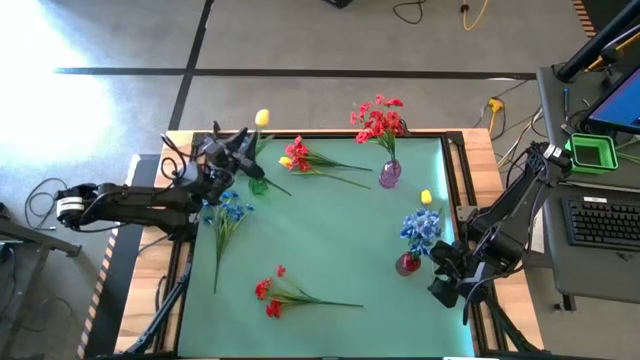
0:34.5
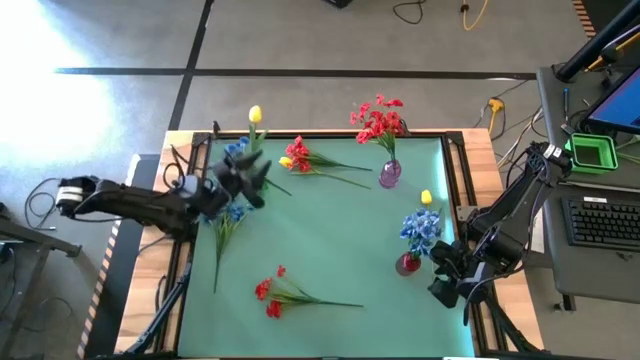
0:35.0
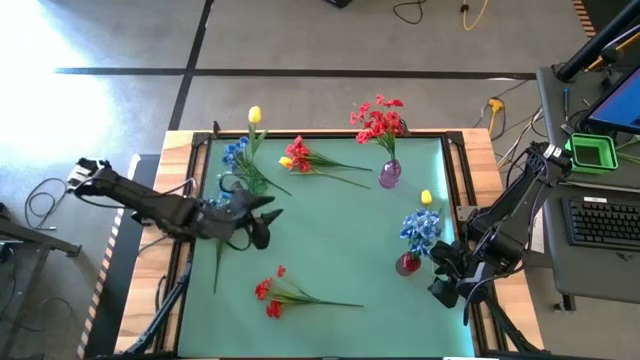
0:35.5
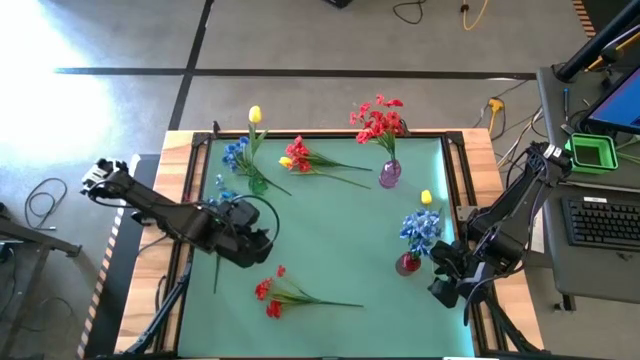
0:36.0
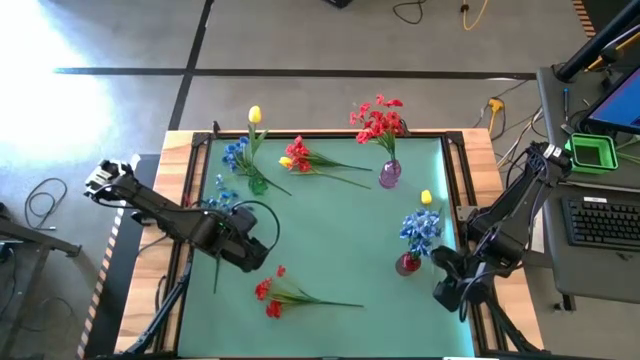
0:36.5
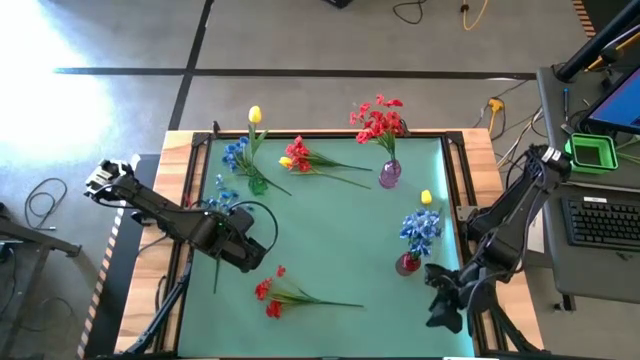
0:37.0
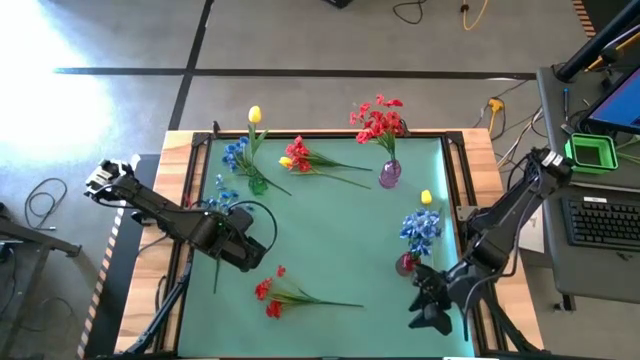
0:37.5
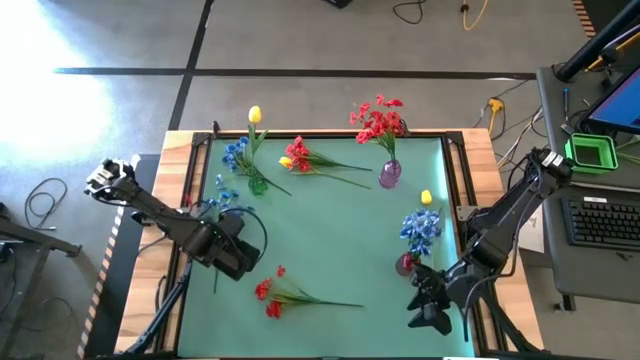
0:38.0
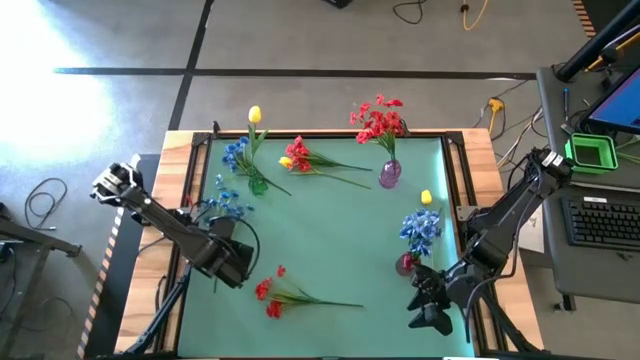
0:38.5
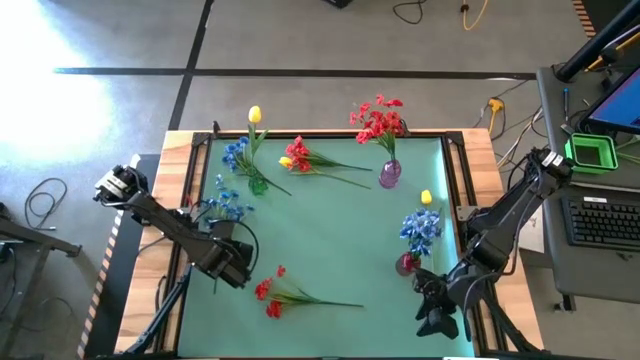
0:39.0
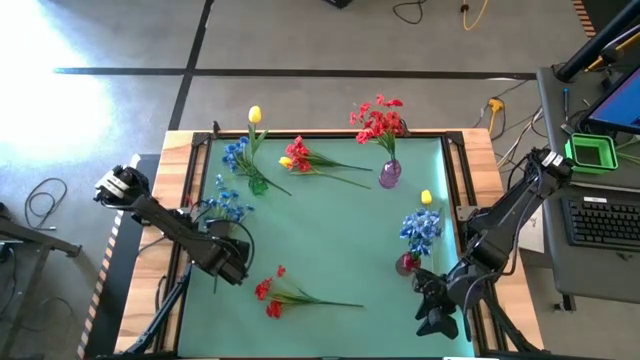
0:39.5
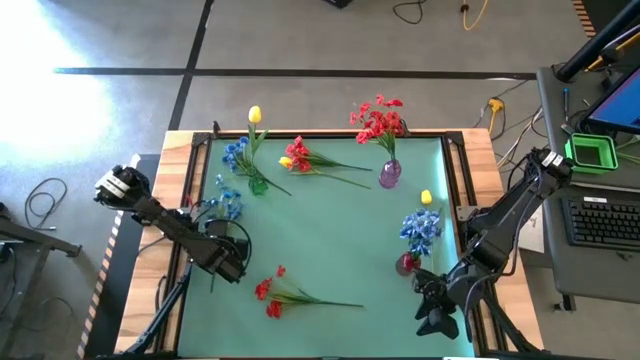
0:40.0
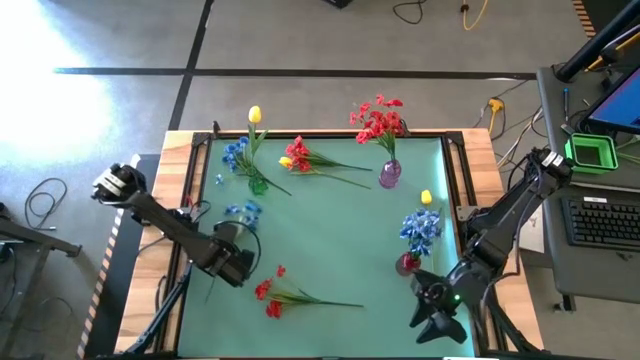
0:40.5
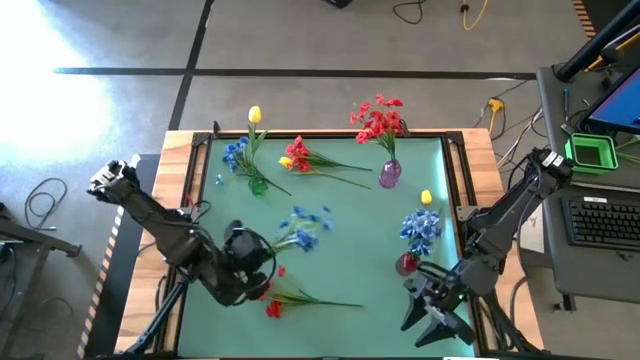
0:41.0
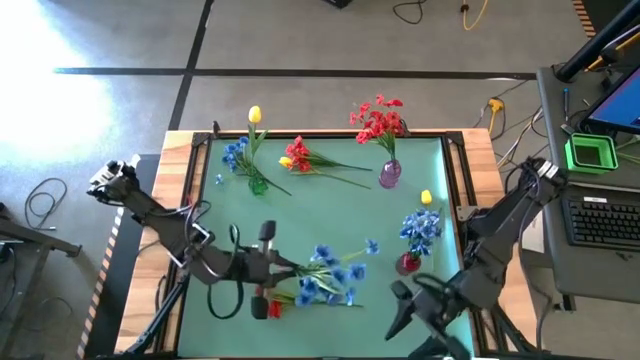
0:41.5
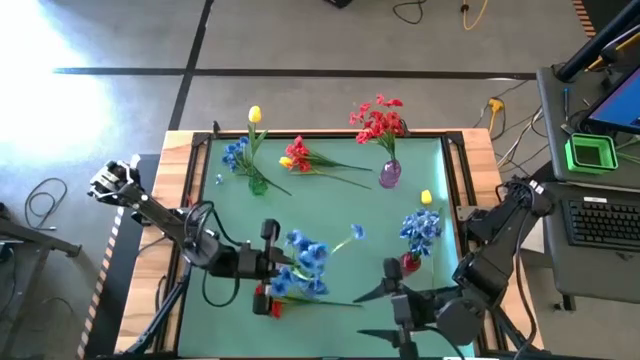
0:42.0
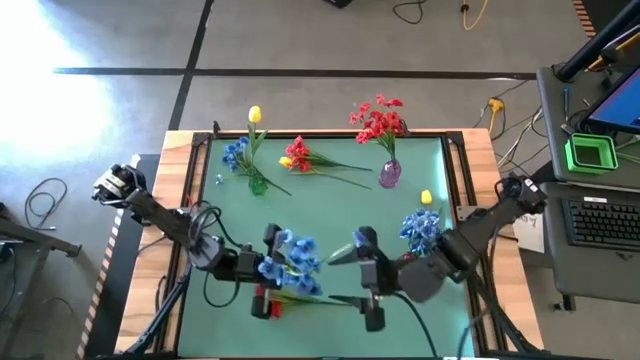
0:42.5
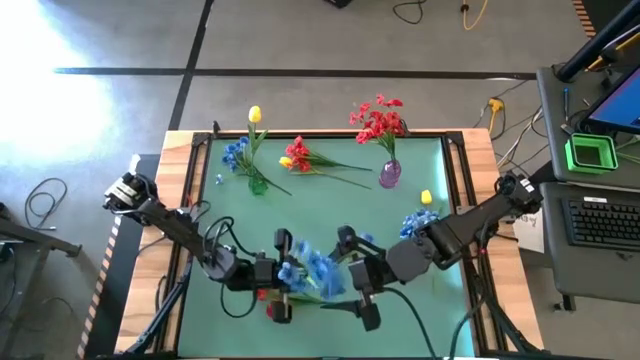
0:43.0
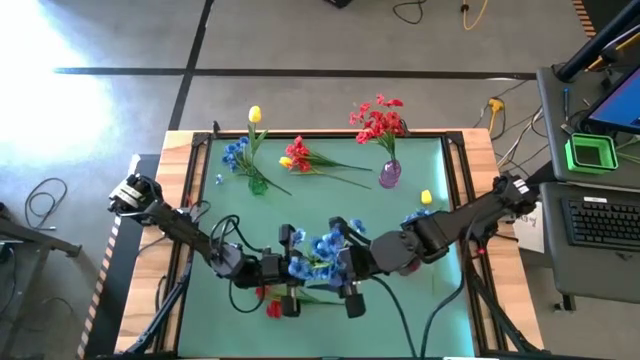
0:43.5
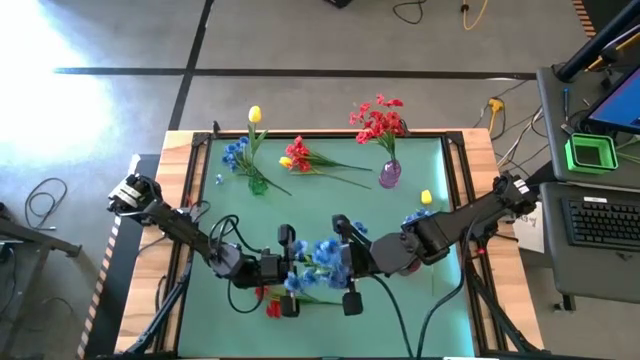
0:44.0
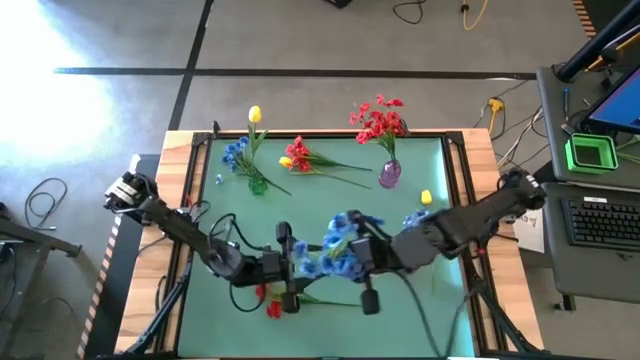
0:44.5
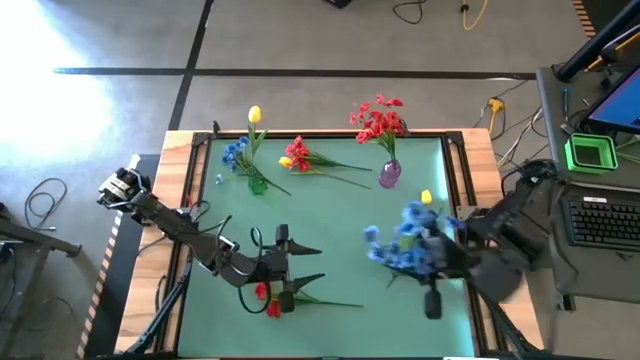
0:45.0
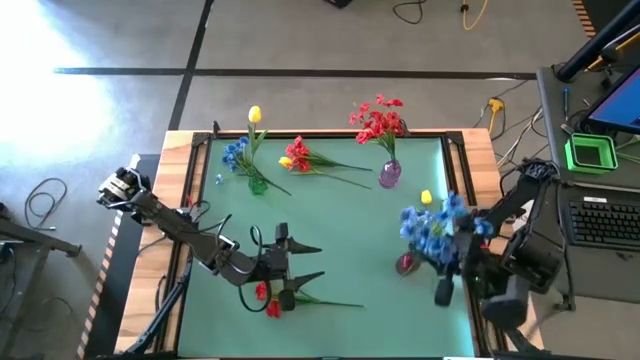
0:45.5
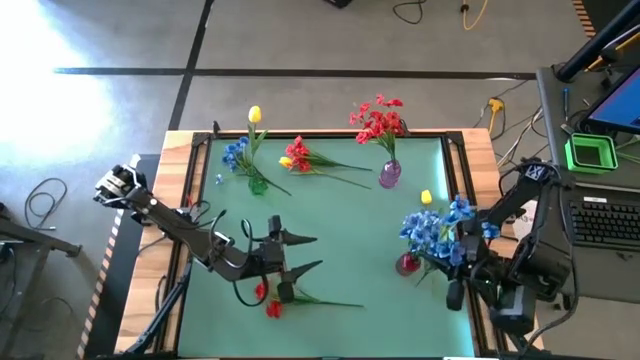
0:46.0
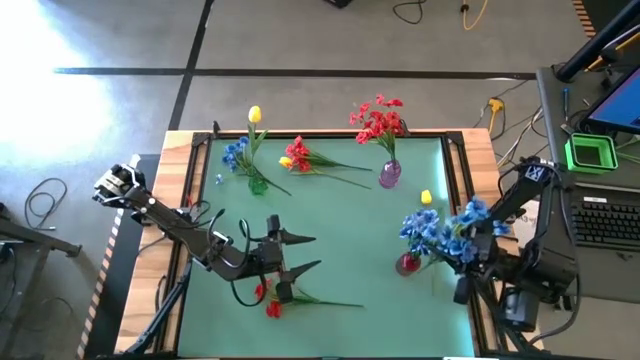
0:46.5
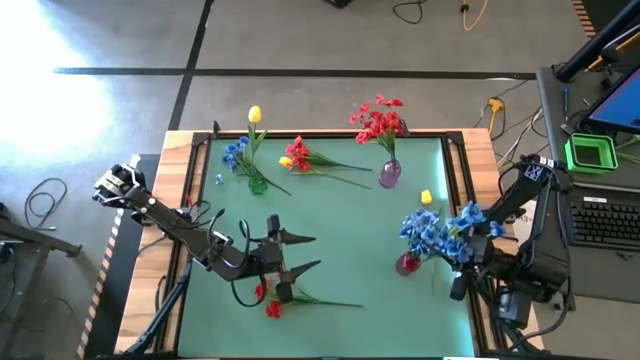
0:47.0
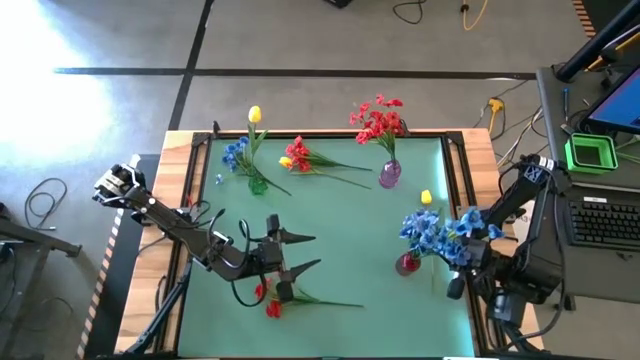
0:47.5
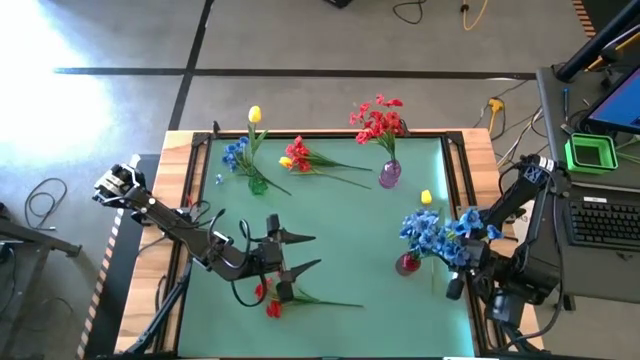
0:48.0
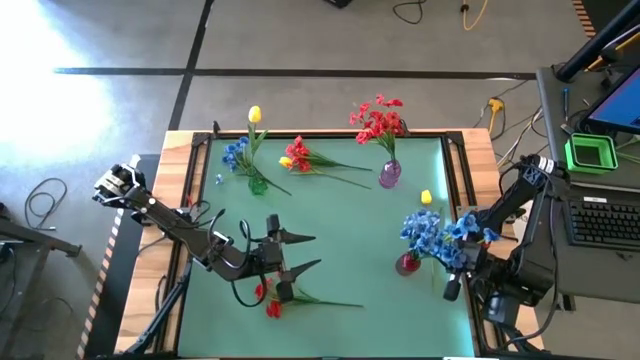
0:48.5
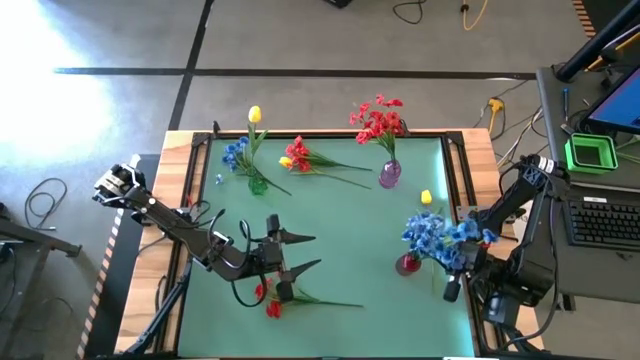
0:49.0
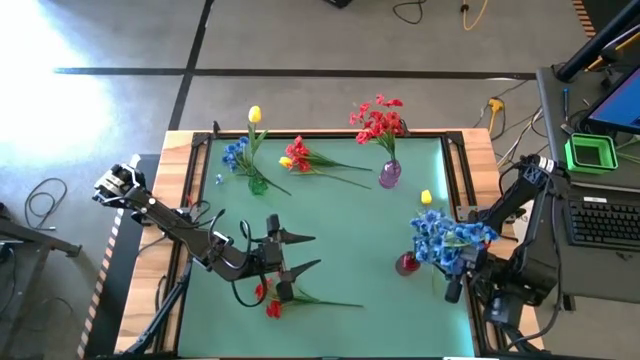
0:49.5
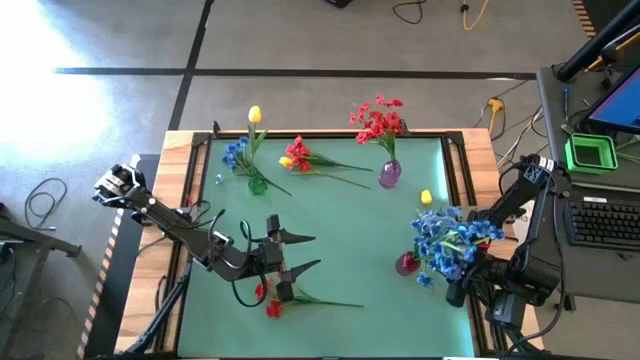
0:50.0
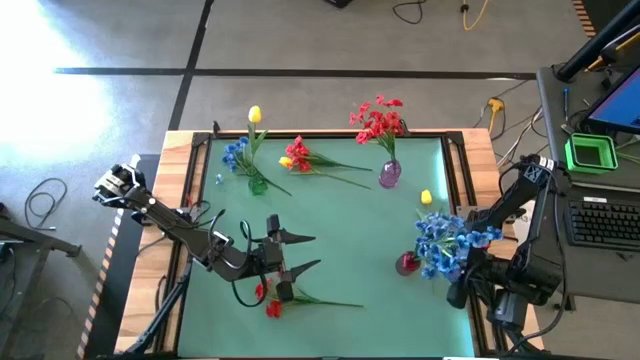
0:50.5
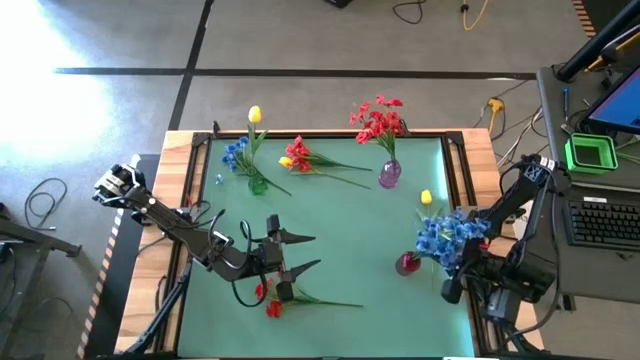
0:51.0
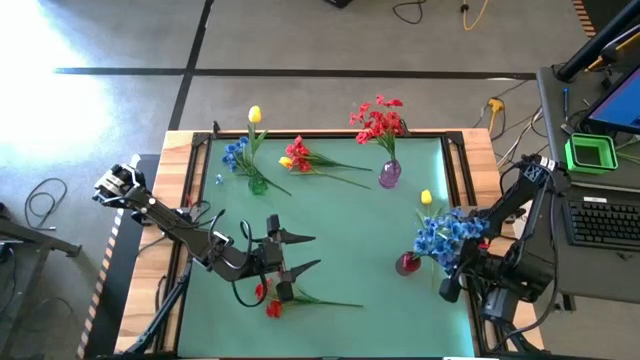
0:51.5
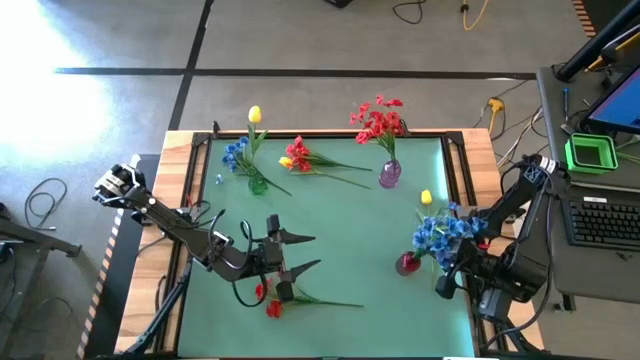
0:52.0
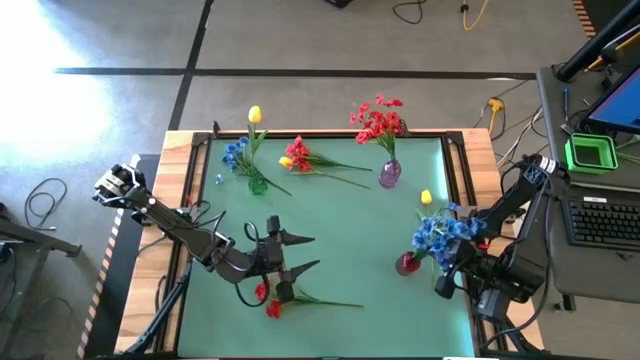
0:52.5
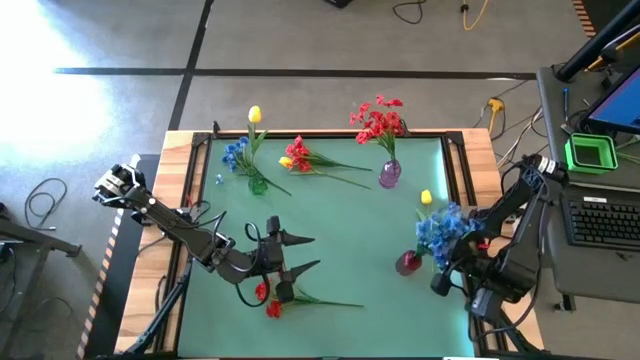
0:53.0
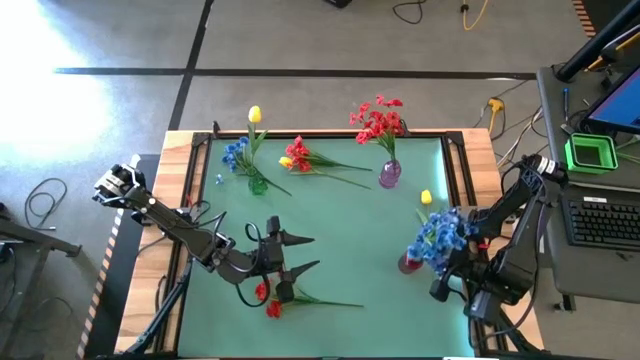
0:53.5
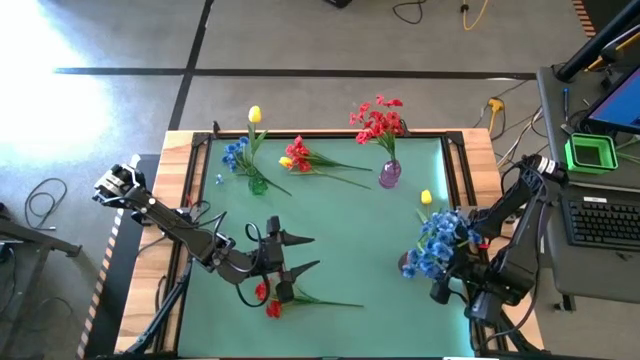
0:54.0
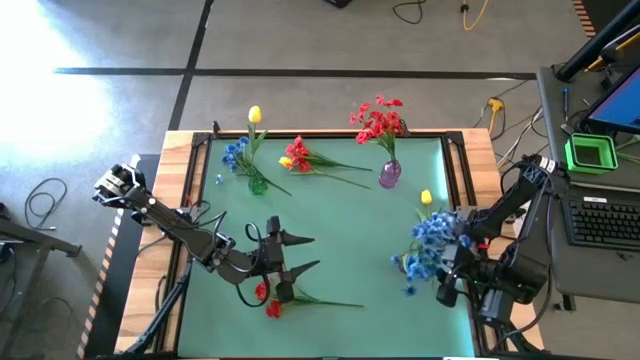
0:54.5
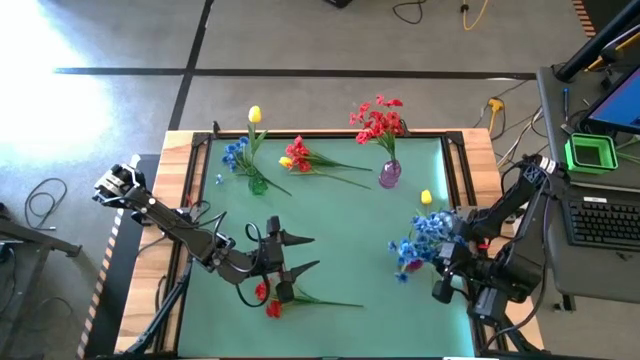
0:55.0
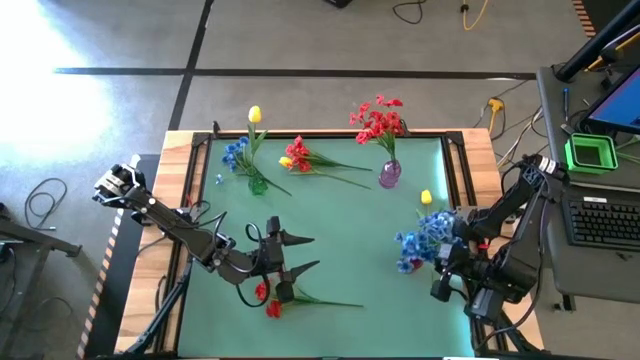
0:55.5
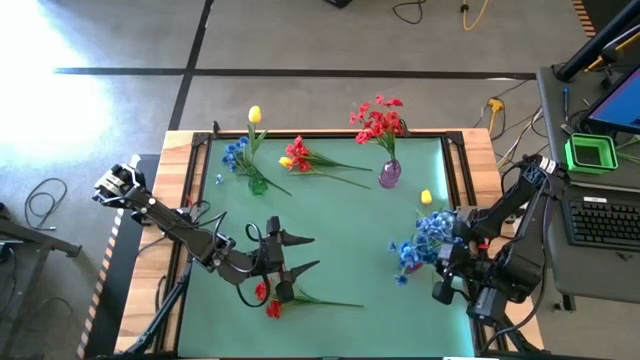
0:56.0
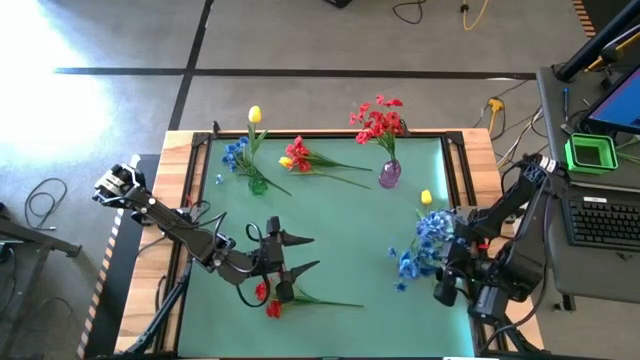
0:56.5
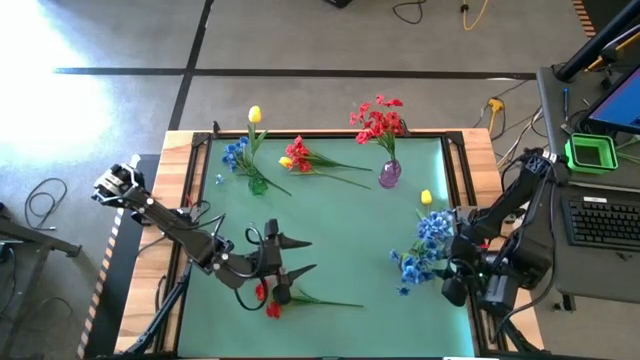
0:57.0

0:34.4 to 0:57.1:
Task: Sort flowers into vase by color
Put the bottom blue flower into the red vase
